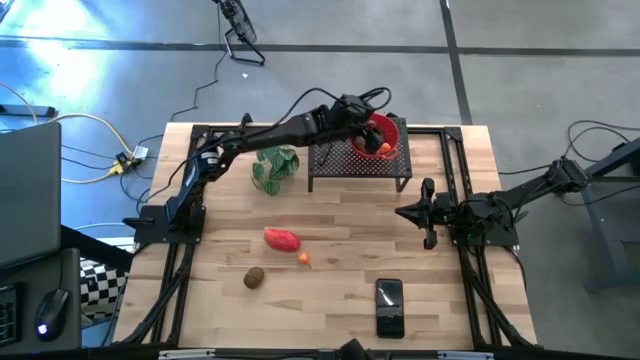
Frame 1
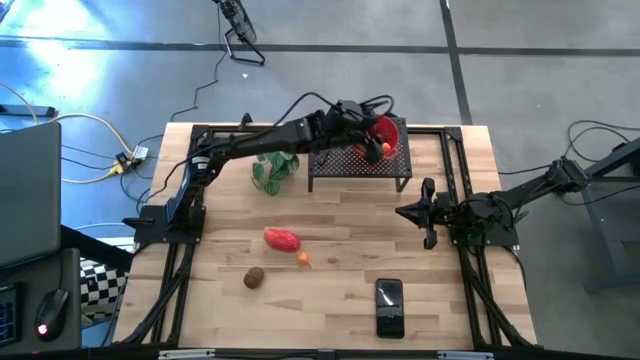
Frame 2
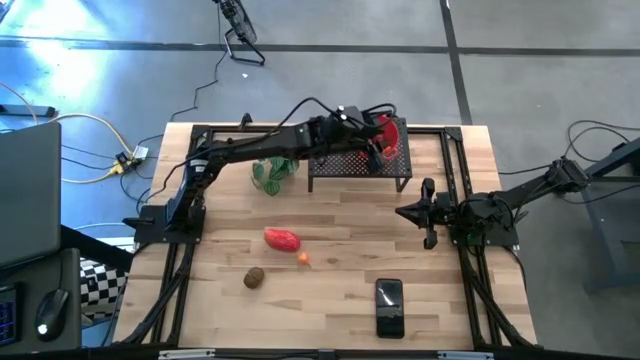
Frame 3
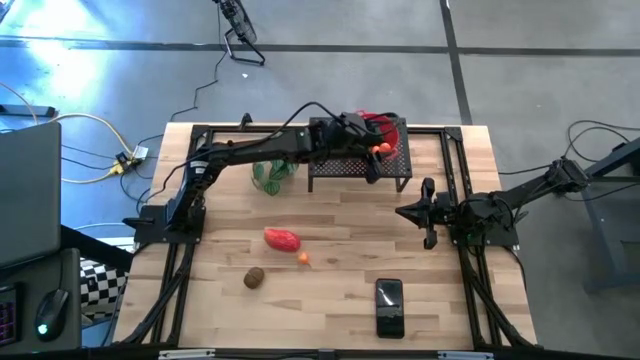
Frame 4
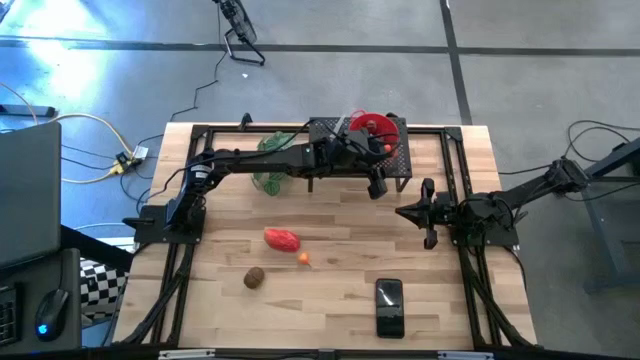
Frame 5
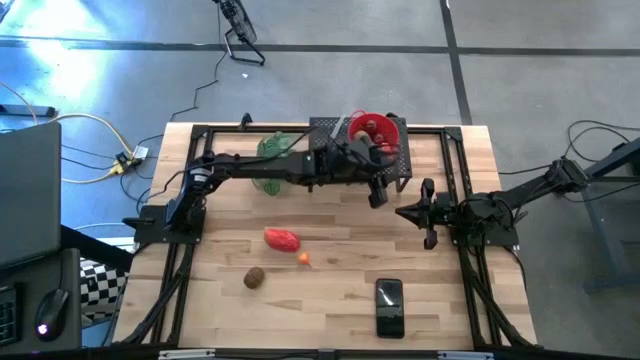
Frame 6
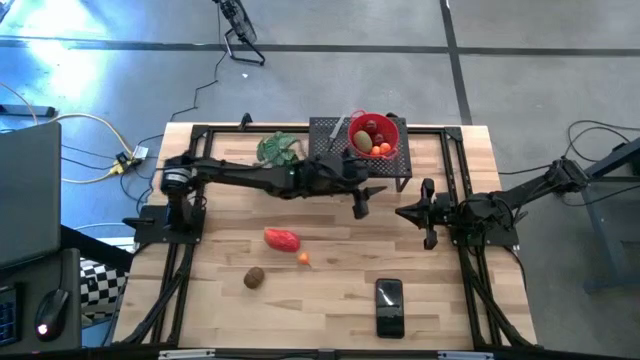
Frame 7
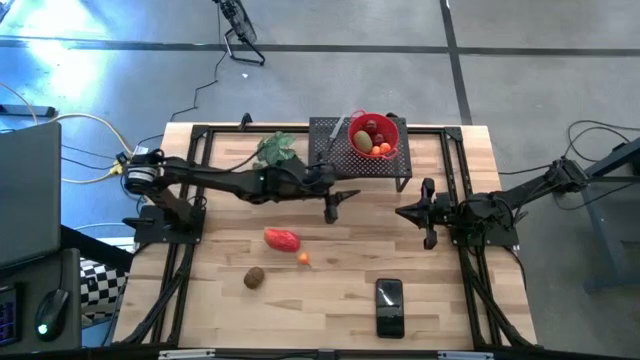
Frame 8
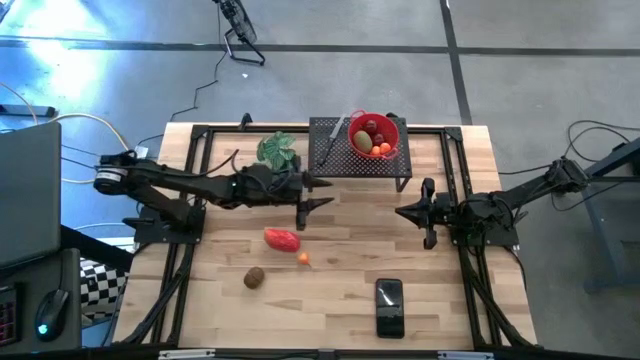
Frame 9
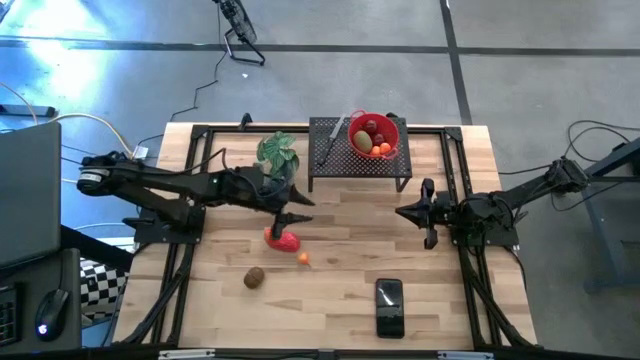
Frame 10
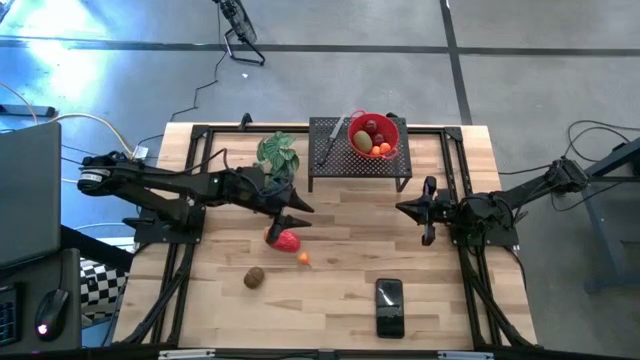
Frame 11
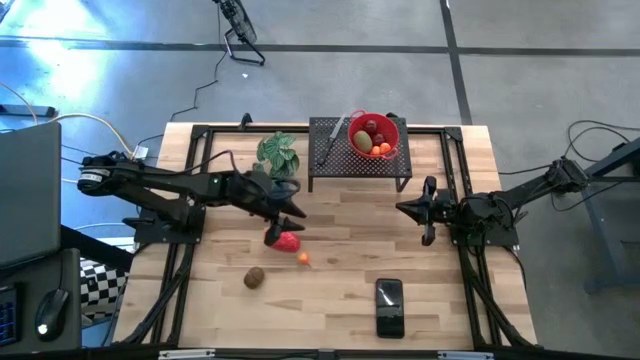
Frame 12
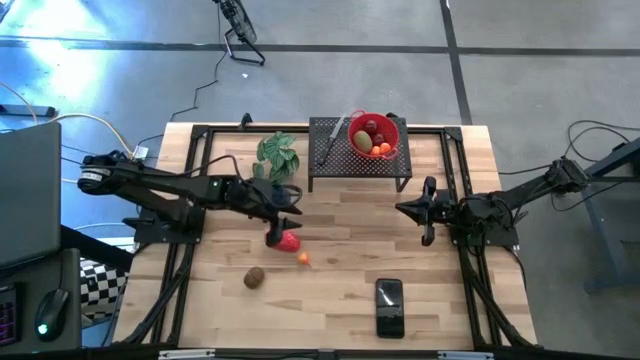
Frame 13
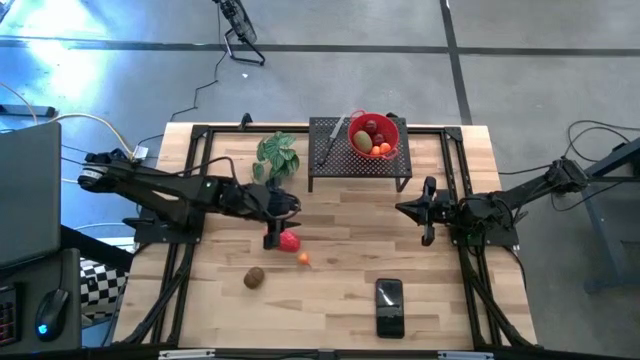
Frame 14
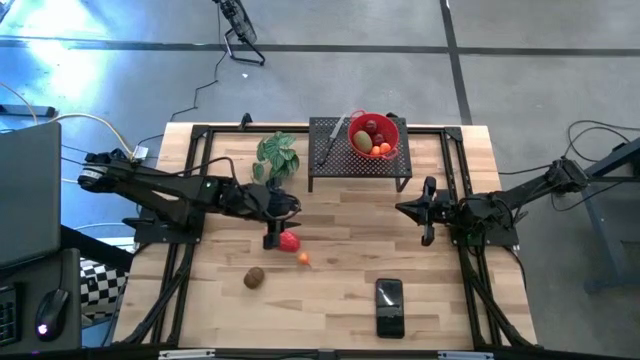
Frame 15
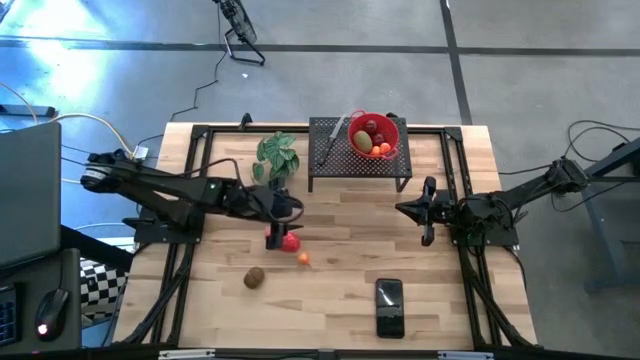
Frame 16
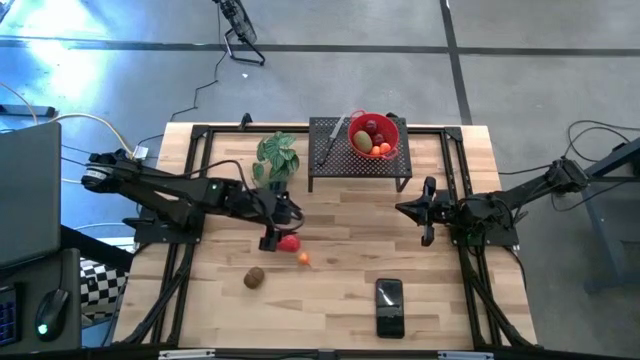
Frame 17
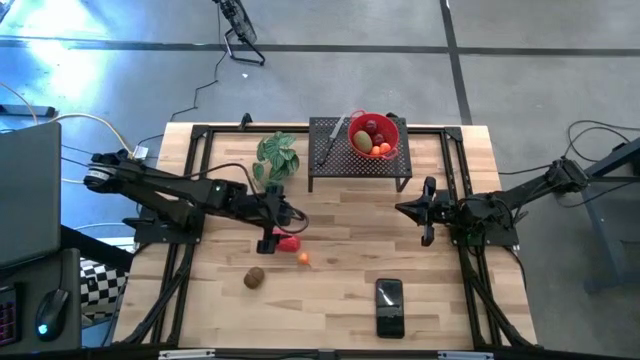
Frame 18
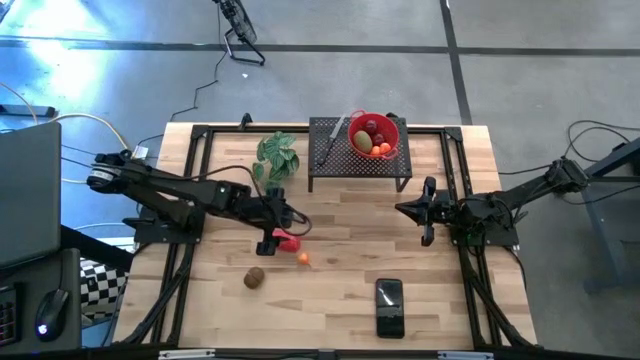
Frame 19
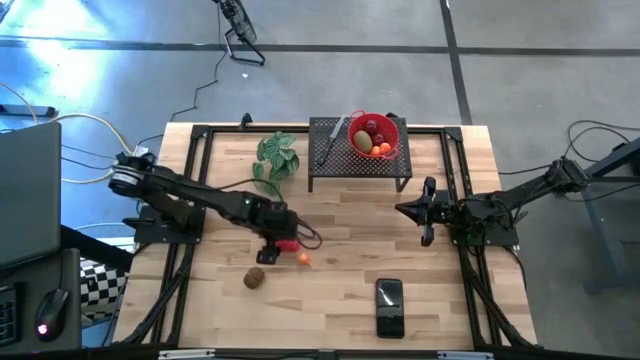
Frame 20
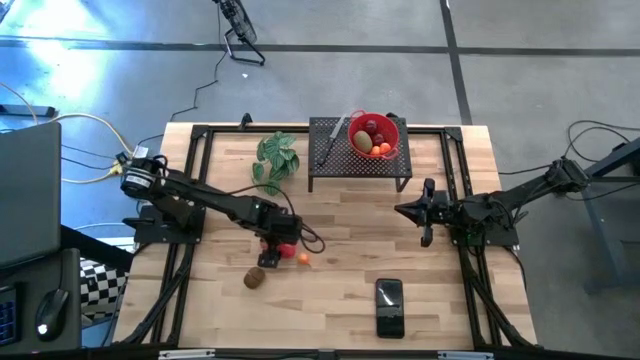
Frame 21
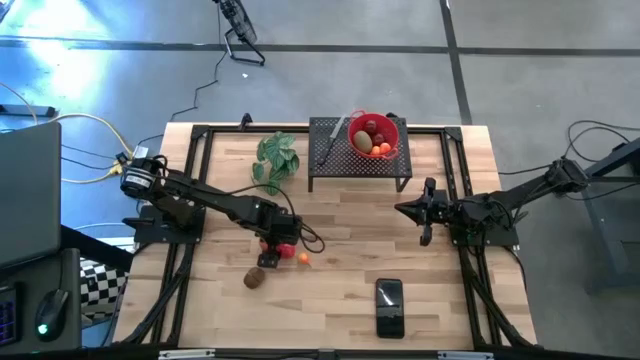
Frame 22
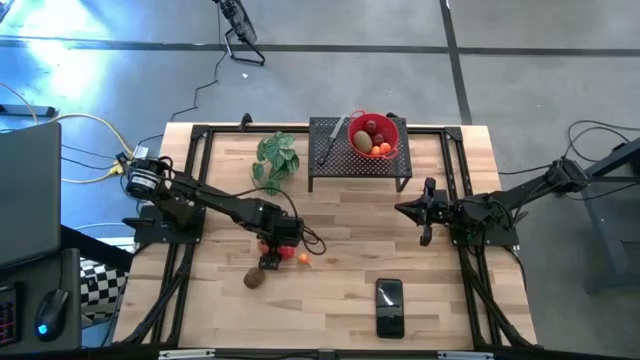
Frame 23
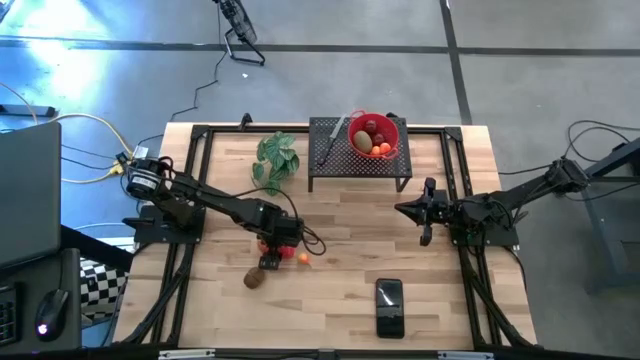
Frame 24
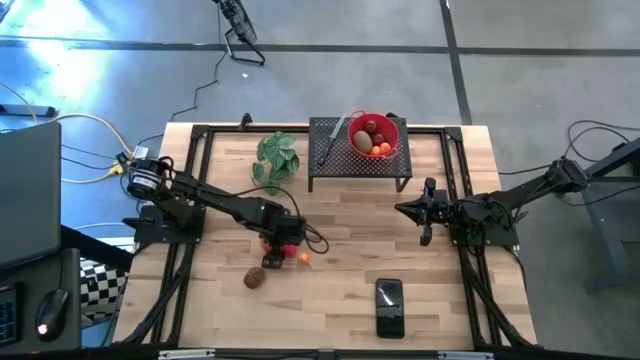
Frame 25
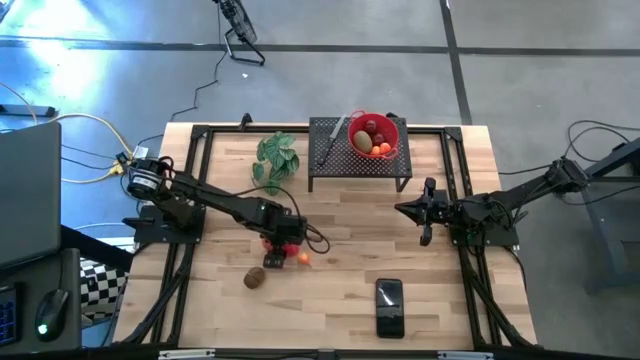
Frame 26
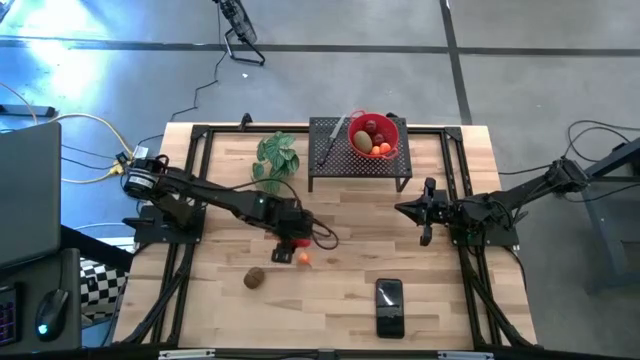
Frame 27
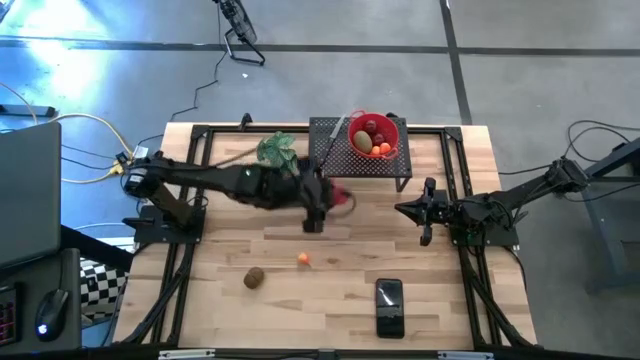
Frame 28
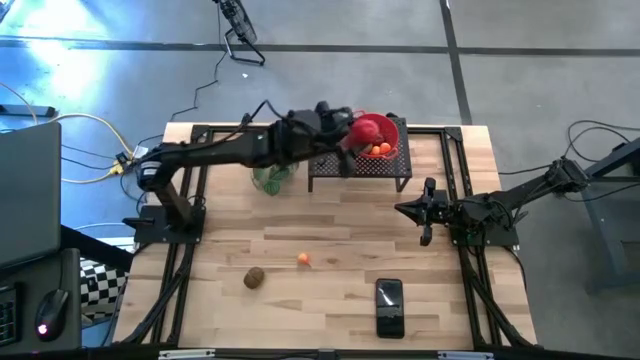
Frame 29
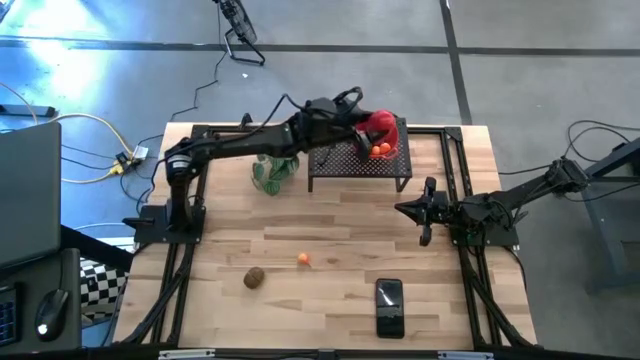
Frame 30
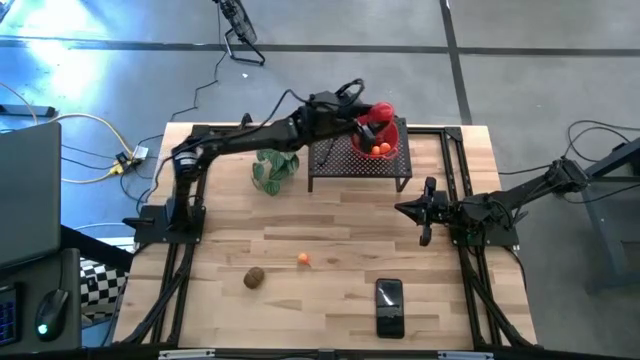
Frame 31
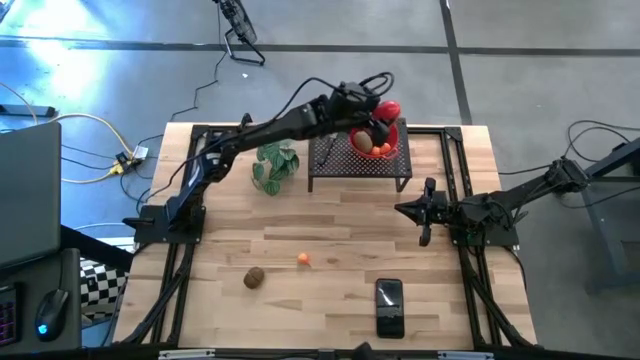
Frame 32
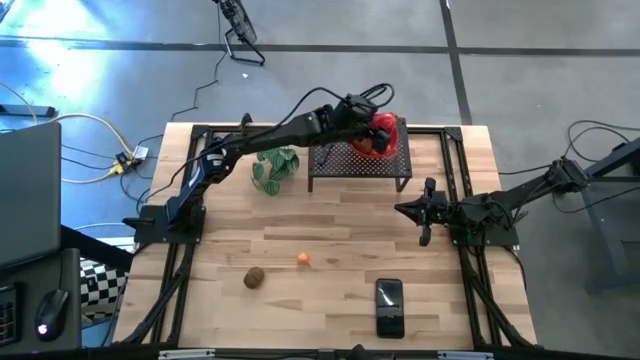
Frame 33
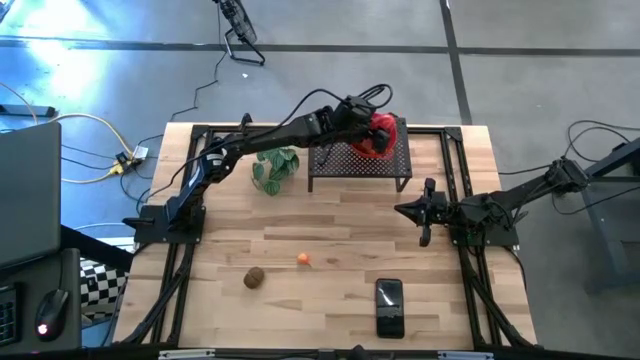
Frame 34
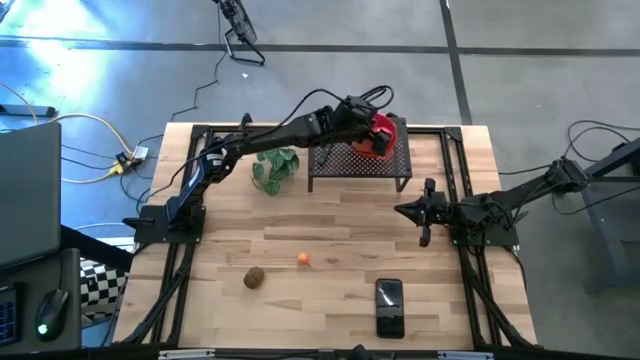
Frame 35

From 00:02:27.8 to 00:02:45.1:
Task: Pick & Place Fruit
Put the red mango into the red strainer bowl on the shelf

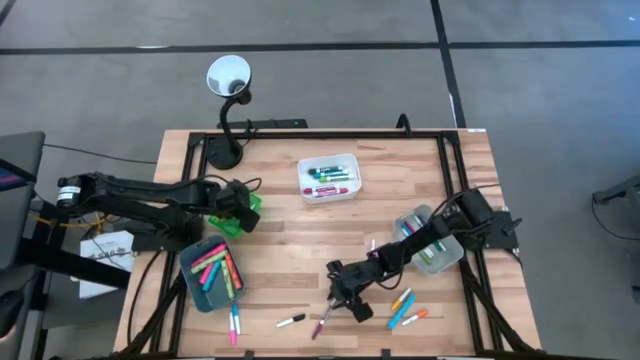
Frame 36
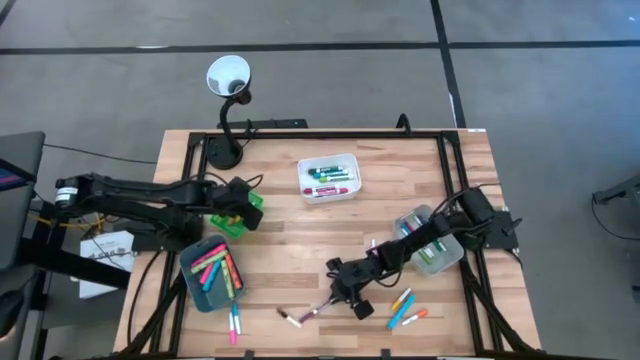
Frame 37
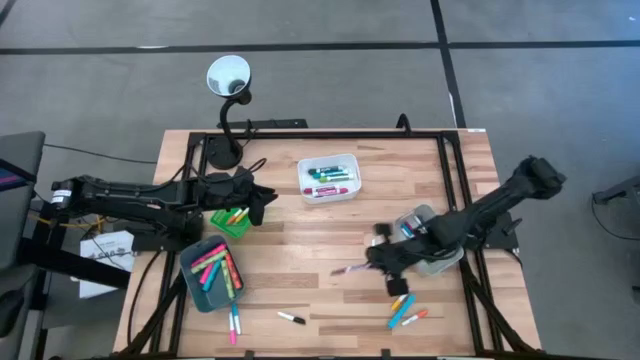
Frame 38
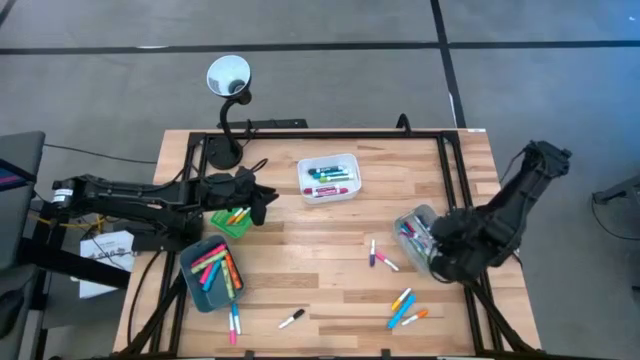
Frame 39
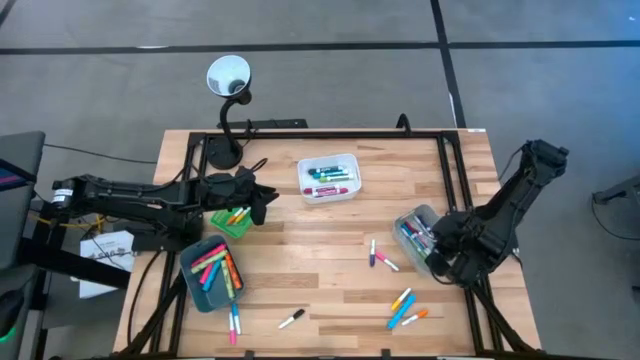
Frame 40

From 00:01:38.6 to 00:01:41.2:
Task: Pick & Place Markers
Put the small violet marker pen into the gray bin

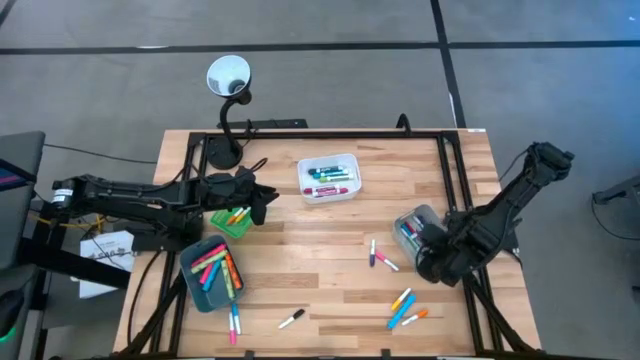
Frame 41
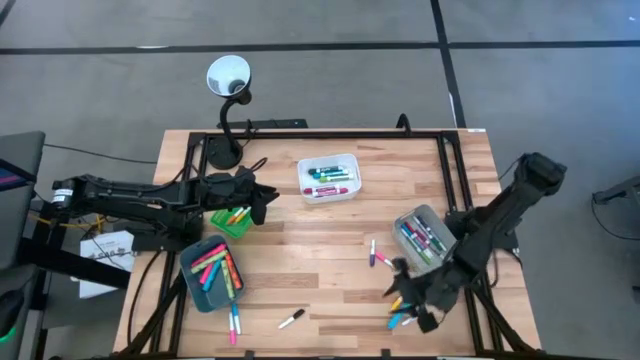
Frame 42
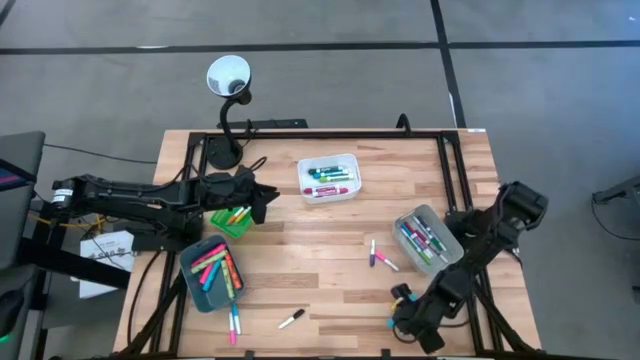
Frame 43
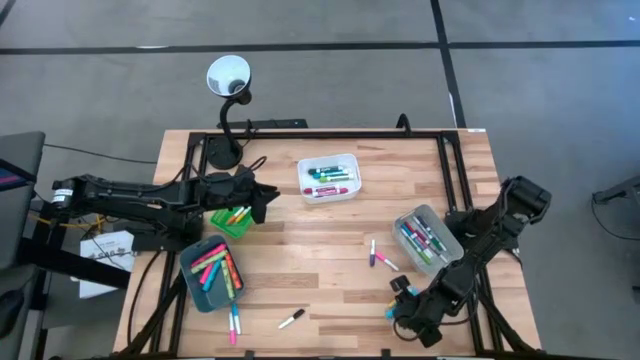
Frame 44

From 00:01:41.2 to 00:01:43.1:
Put the big blue highlighter pen into the blue bin
